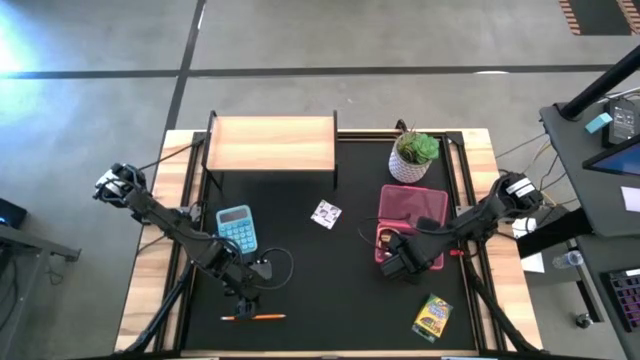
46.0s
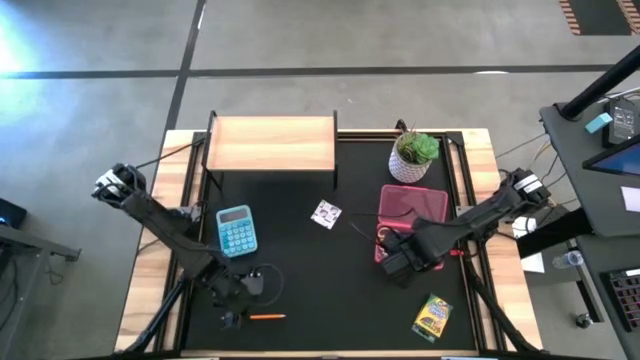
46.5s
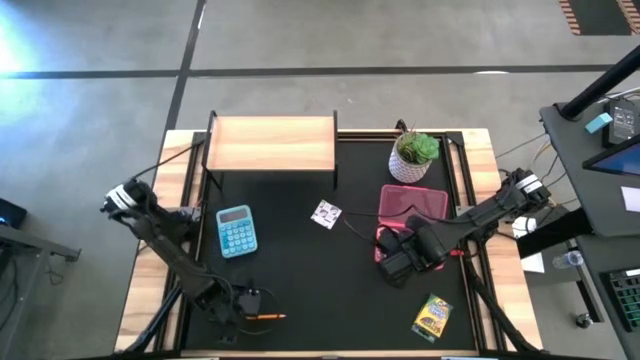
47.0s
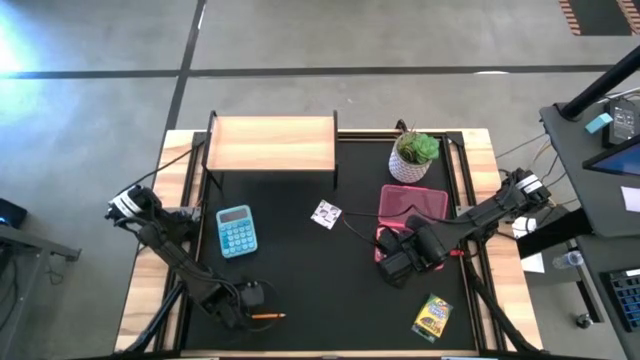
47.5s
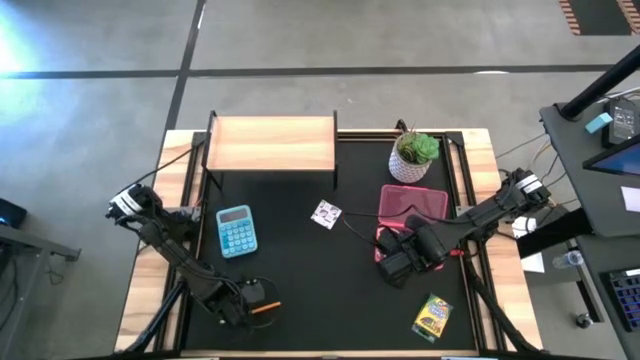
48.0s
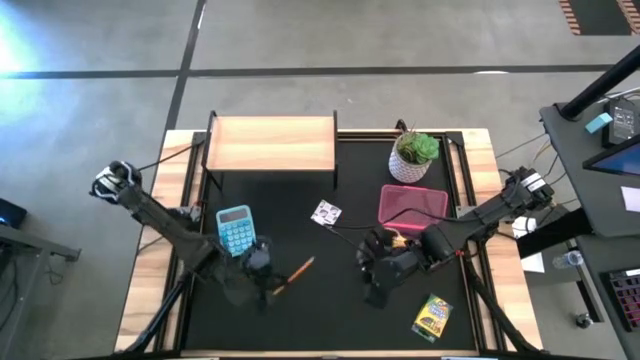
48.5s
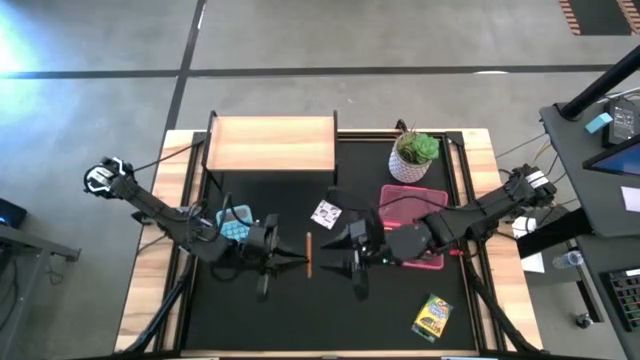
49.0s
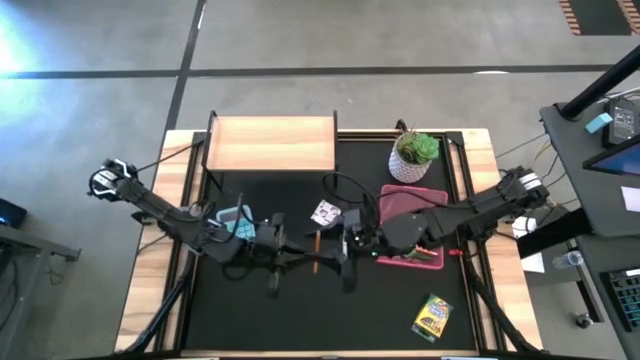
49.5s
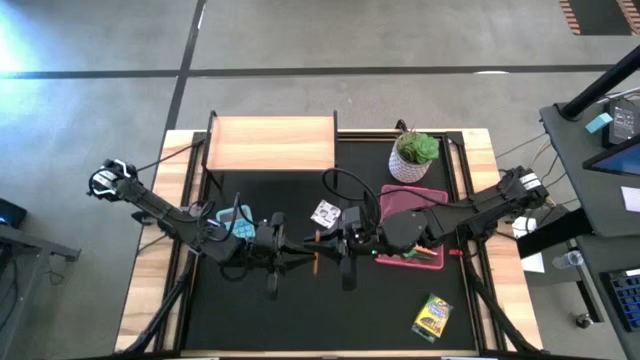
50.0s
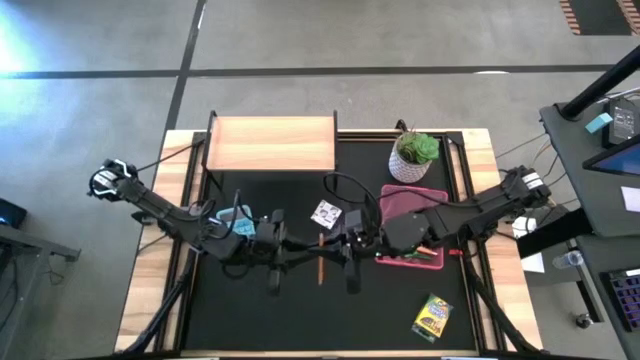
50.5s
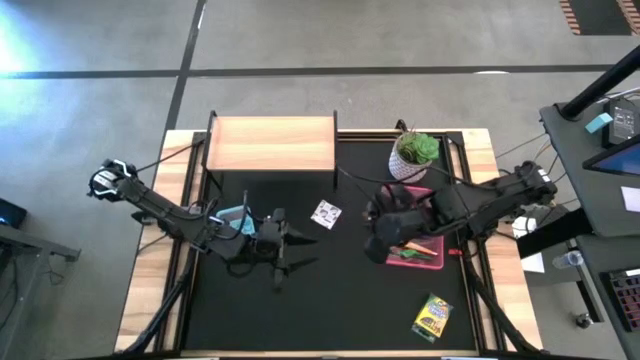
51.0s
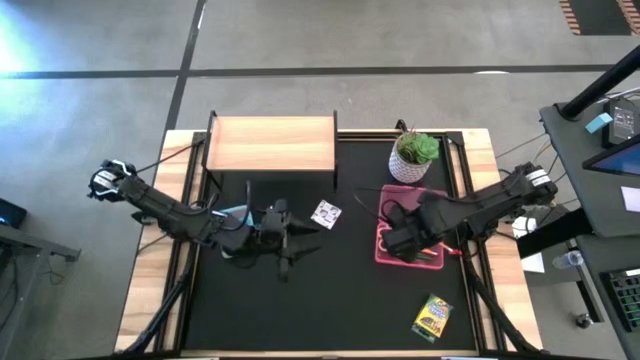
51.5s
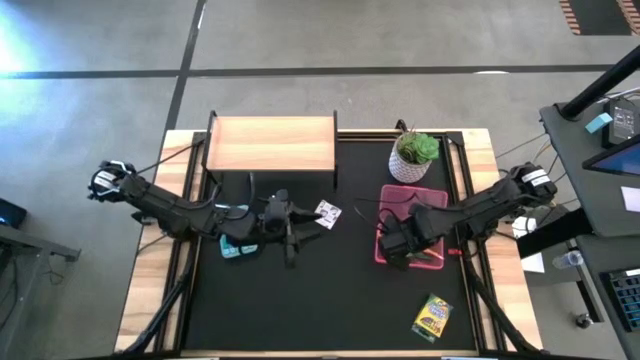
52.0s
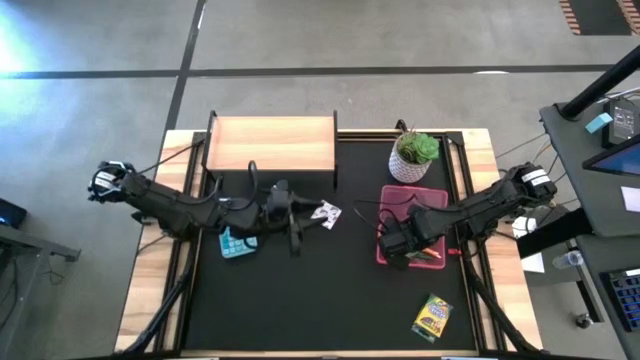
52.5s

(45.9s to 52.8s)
Task: Pack school essentials
Put the yellow pencil into the pink case

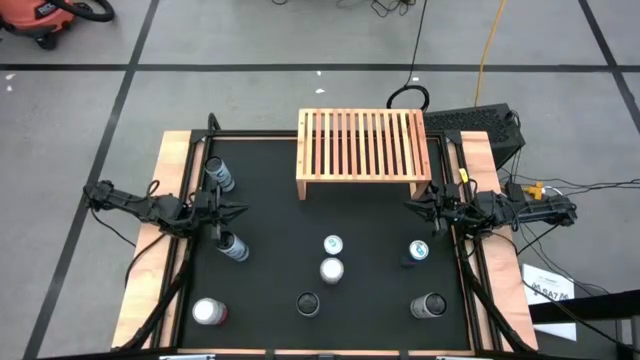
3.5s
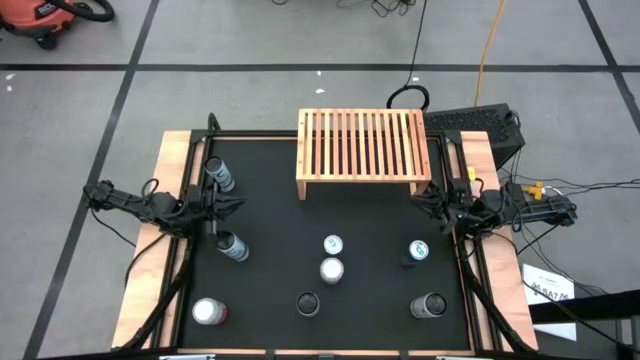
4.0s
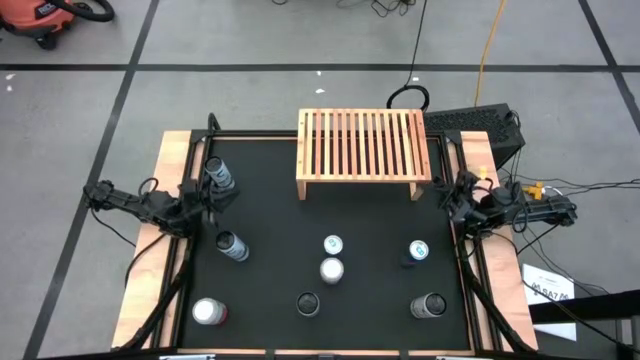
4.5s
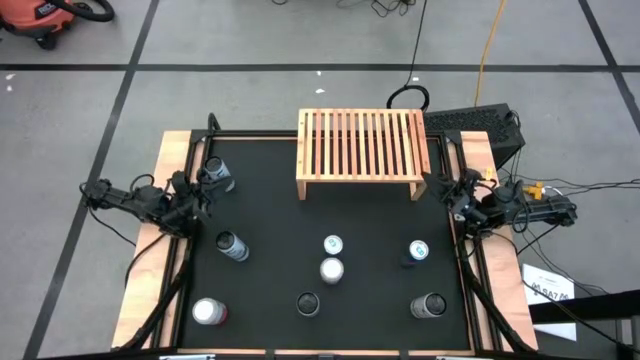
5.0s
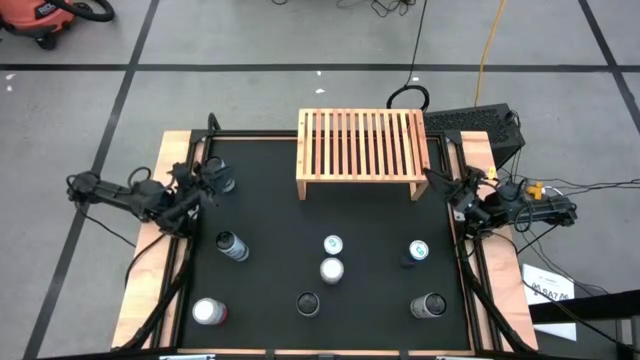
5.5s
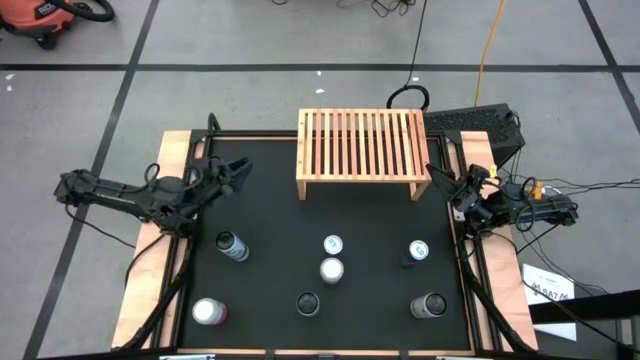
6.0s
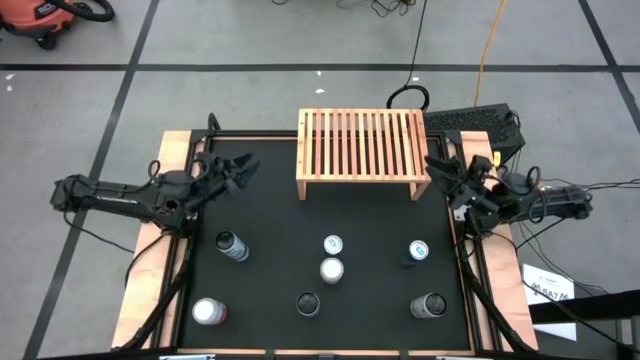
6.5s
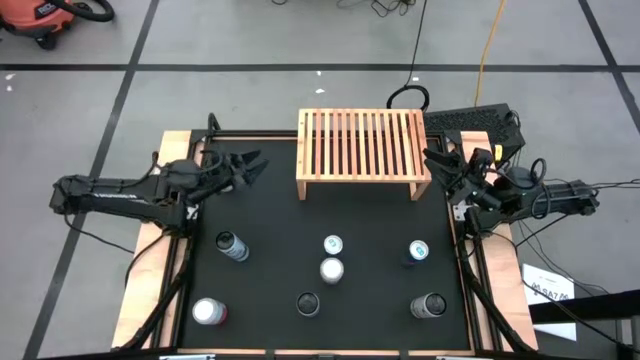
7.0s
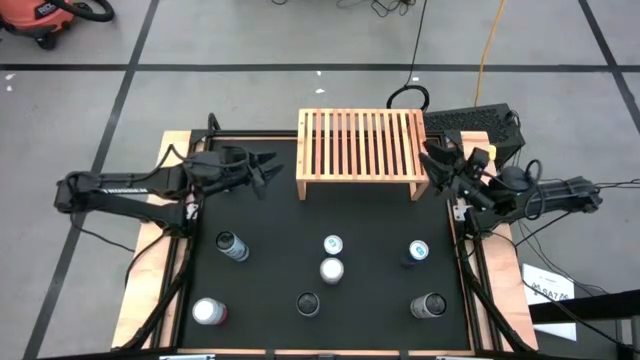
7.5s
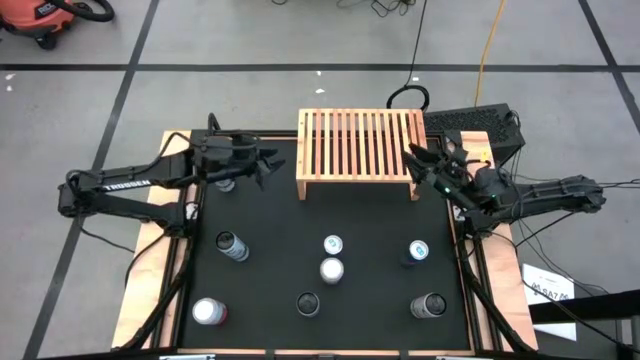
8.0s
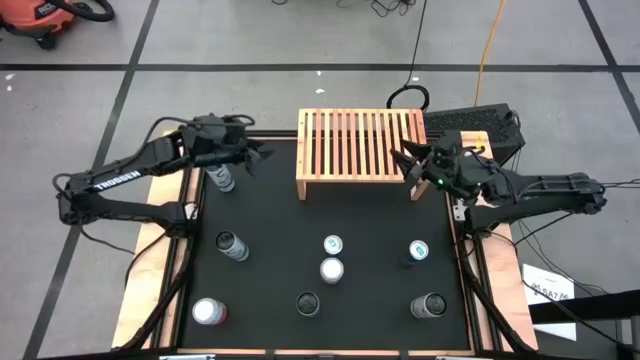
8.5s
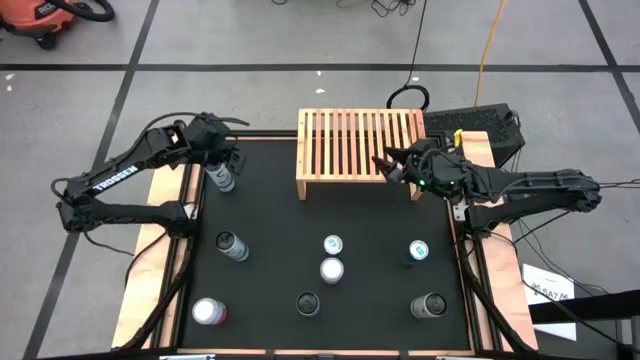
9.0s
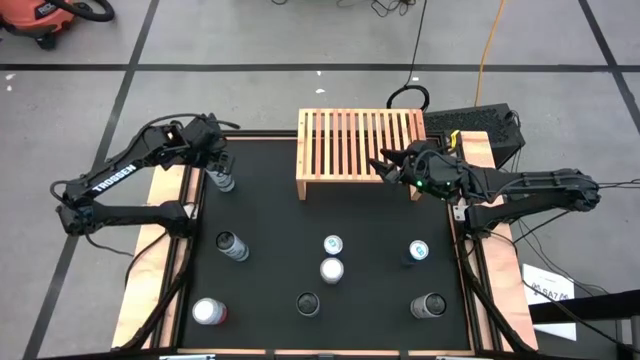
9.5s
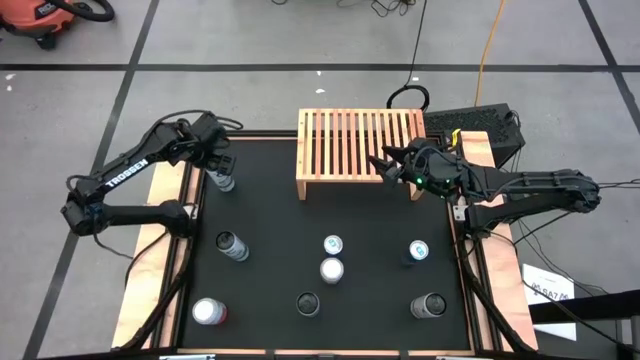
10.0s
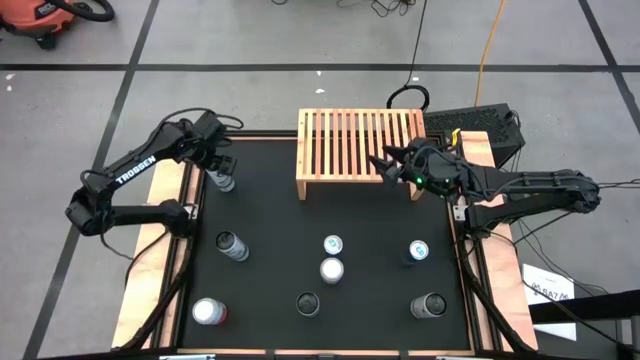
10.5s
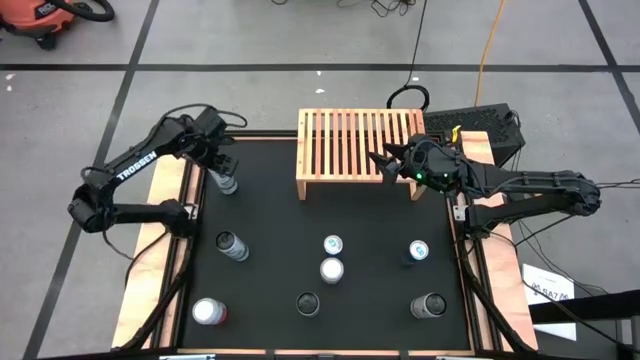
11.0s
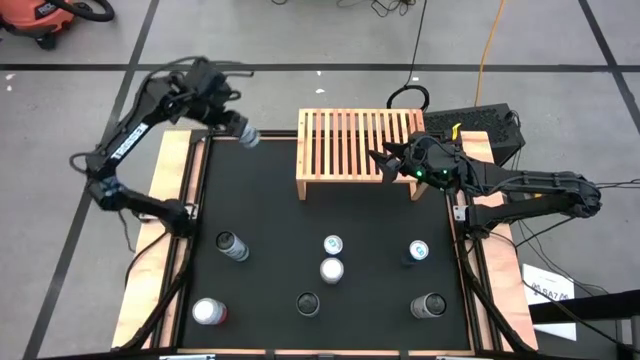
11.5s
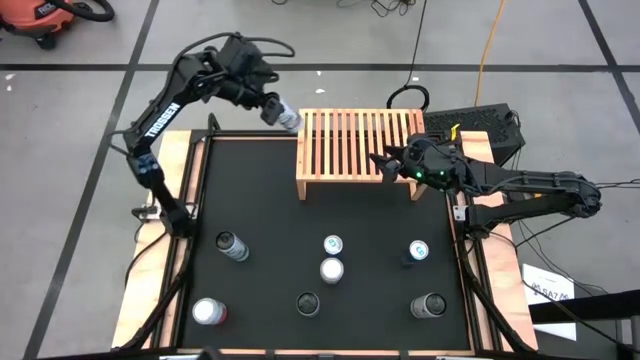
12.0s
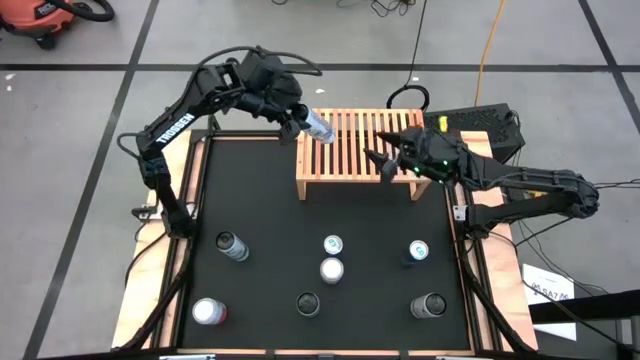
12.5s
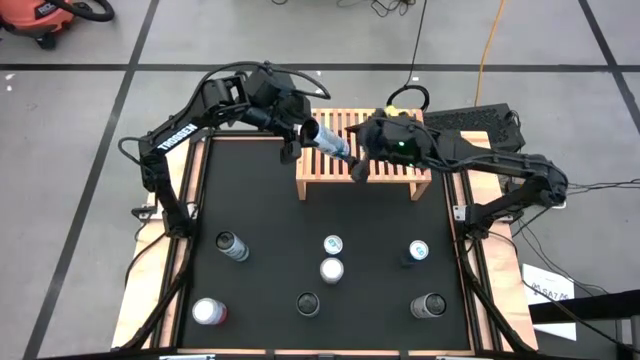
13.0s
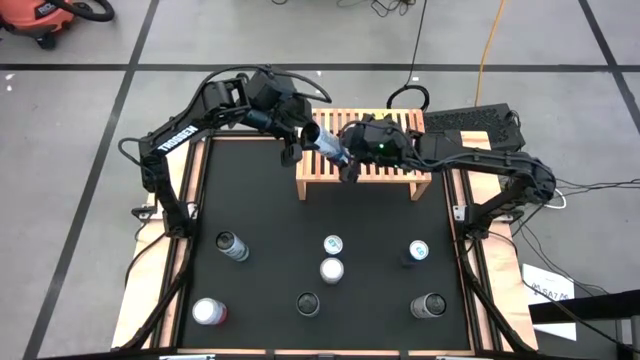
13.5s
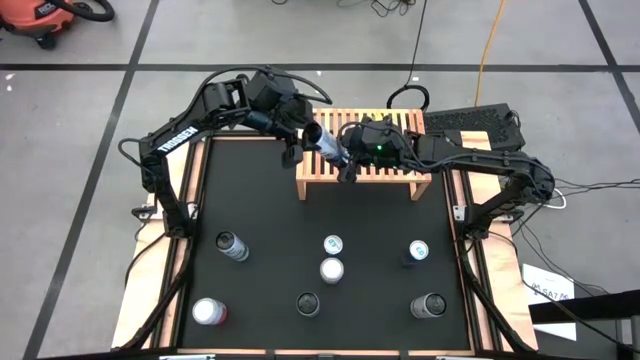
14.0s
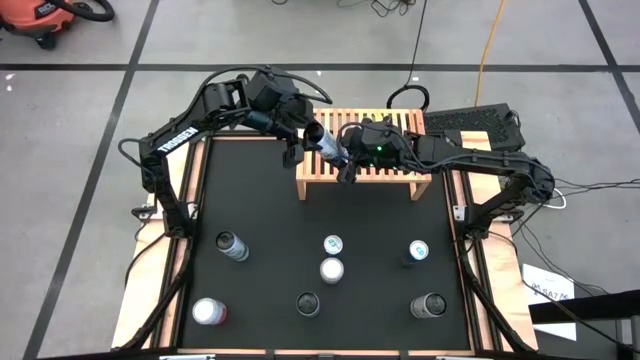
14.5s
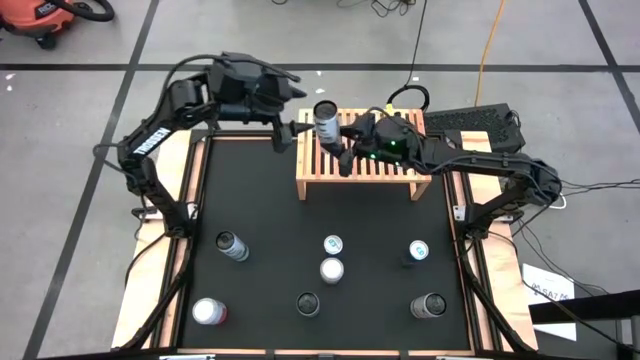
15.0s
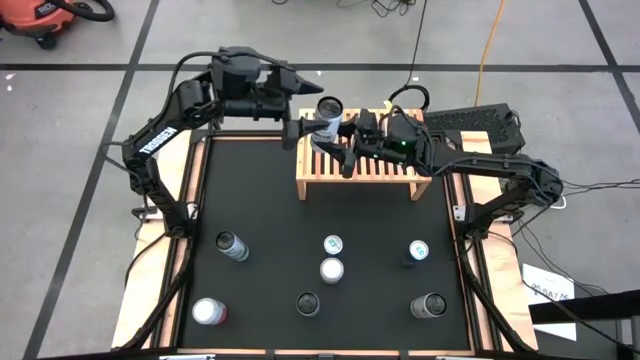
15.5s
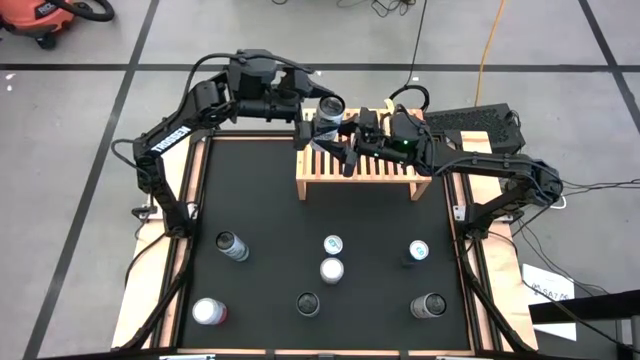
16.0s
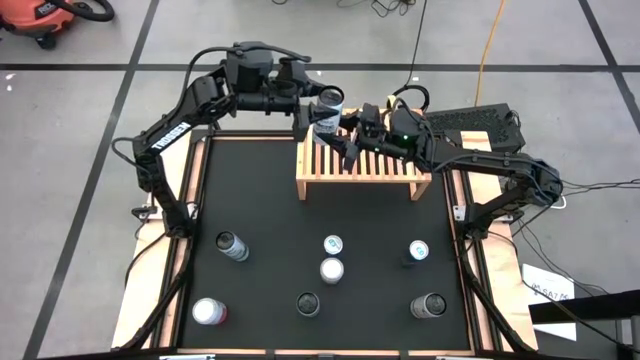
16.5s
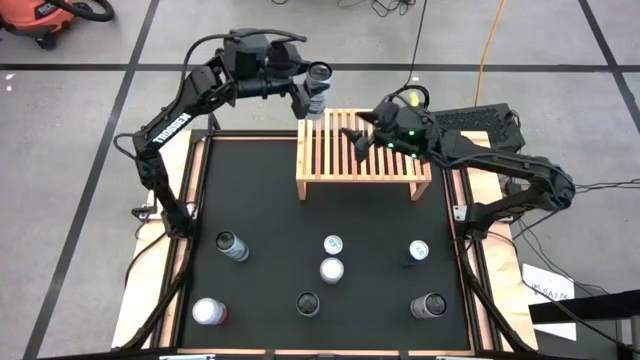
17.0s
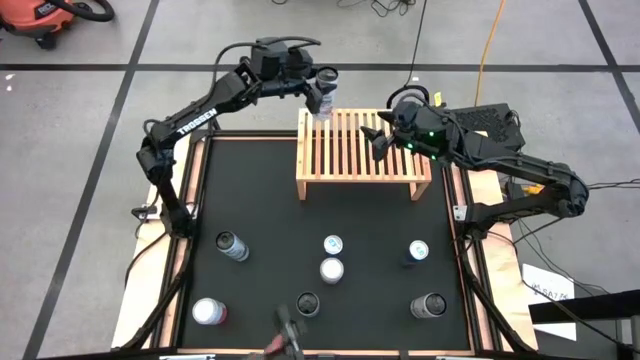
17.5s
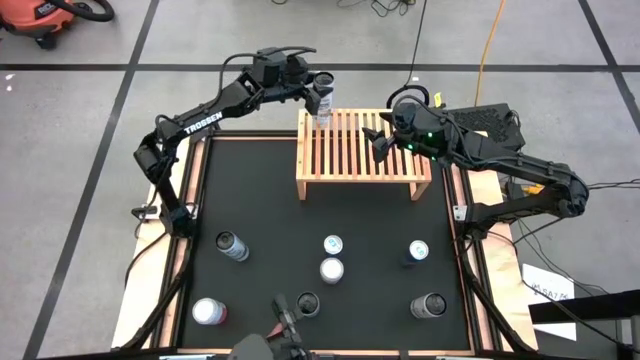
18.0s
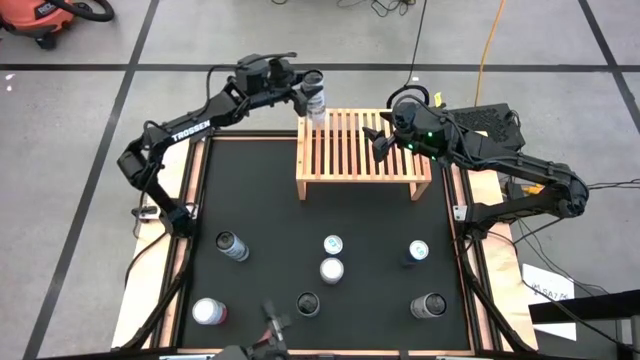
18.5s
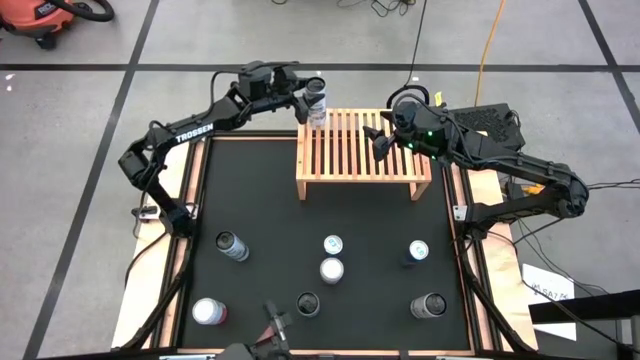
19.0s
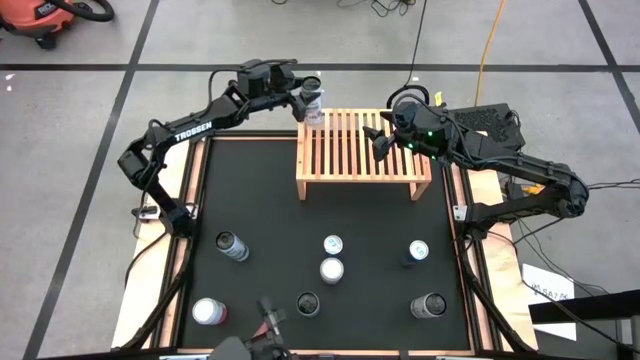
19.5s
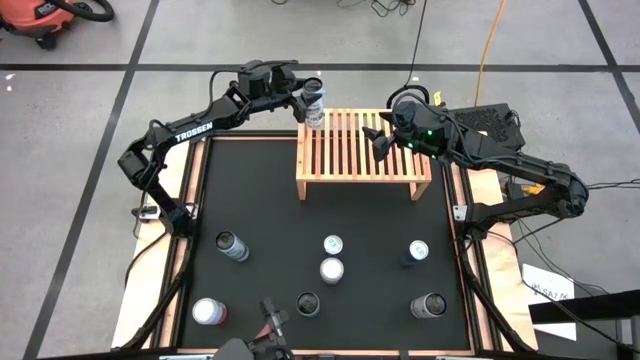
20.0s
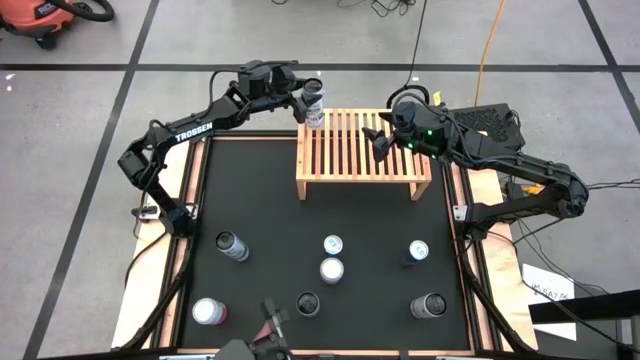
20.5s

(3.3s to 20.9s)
Task: Place canned beverage on shelf
Put the blue soda can on the shelf
